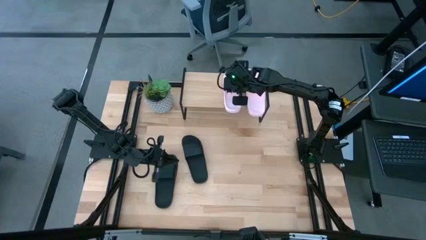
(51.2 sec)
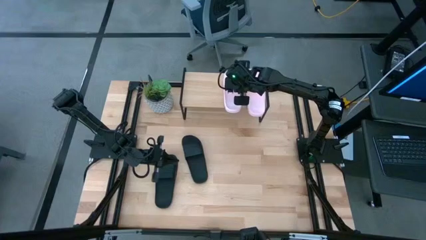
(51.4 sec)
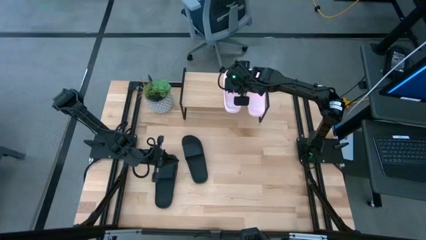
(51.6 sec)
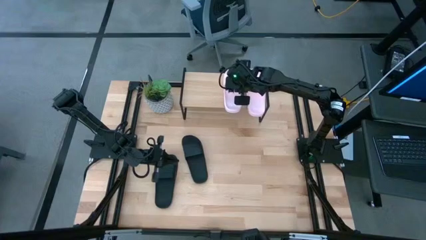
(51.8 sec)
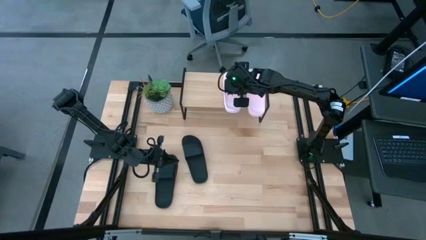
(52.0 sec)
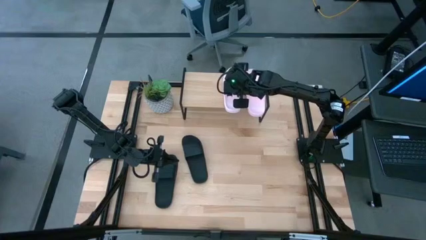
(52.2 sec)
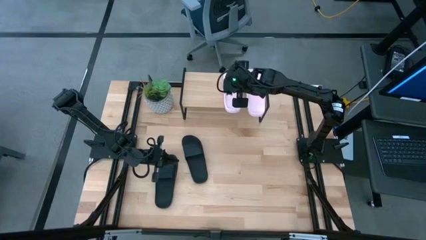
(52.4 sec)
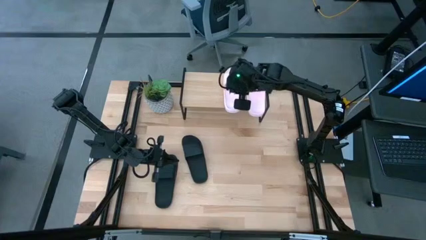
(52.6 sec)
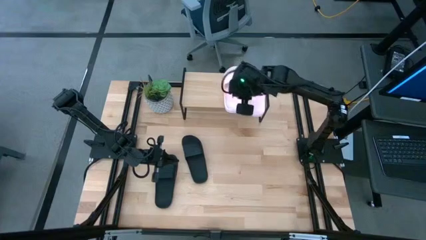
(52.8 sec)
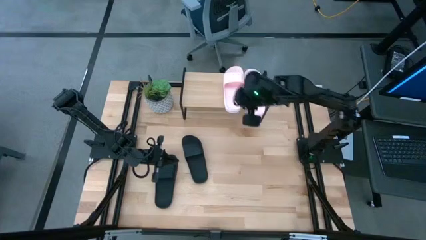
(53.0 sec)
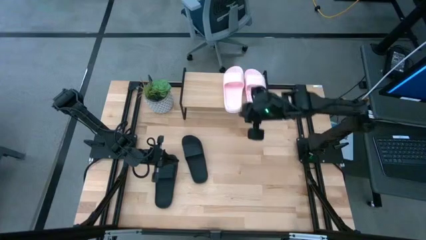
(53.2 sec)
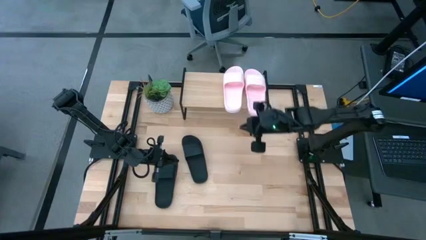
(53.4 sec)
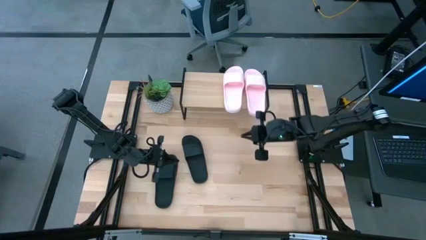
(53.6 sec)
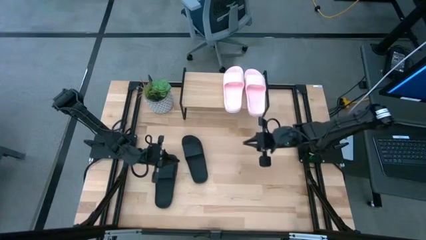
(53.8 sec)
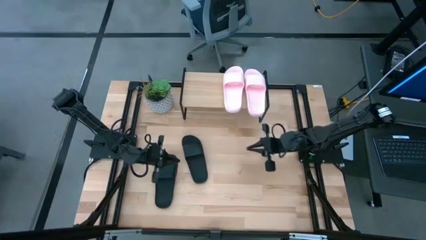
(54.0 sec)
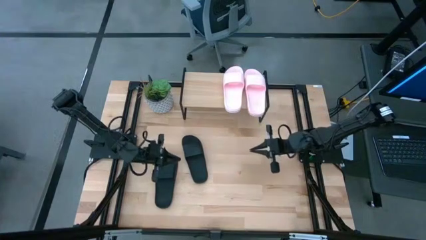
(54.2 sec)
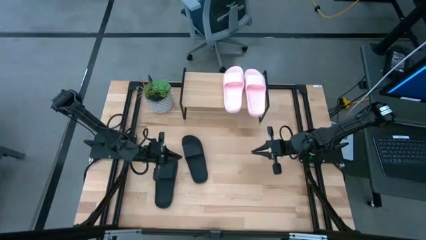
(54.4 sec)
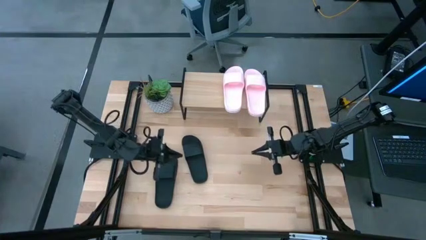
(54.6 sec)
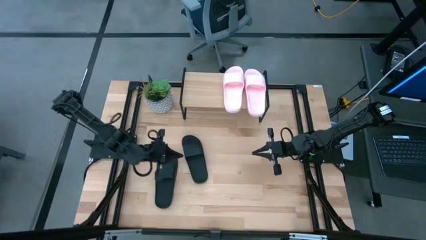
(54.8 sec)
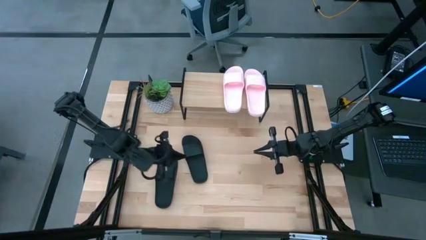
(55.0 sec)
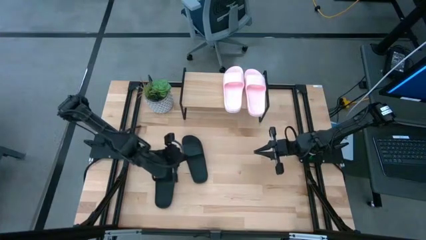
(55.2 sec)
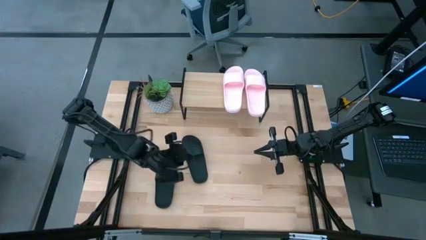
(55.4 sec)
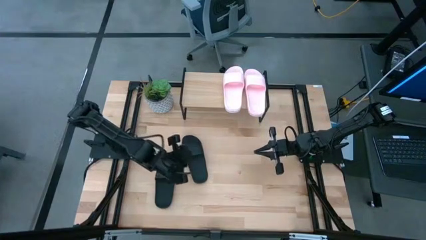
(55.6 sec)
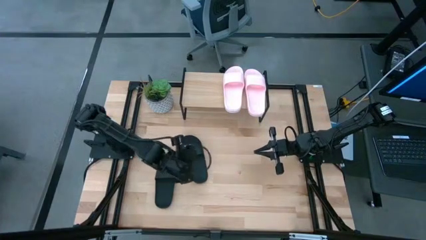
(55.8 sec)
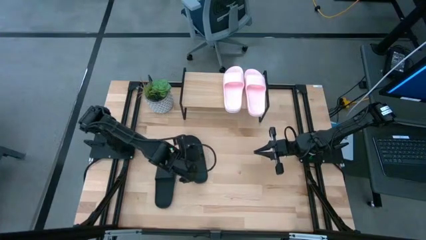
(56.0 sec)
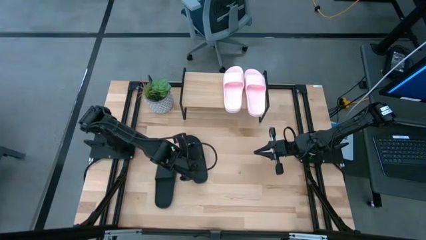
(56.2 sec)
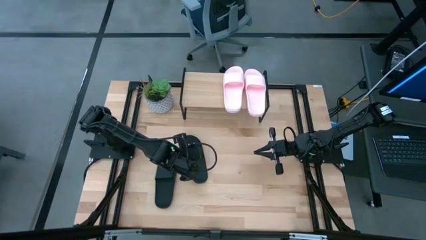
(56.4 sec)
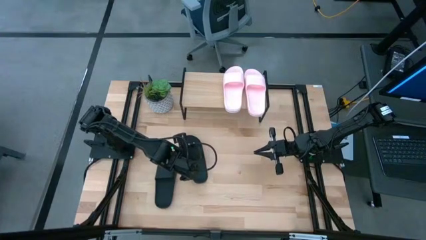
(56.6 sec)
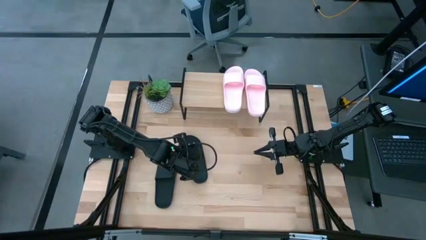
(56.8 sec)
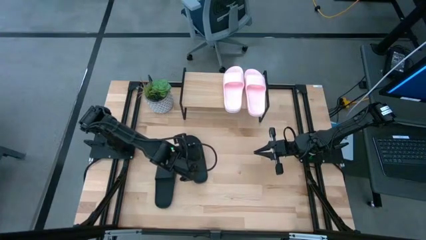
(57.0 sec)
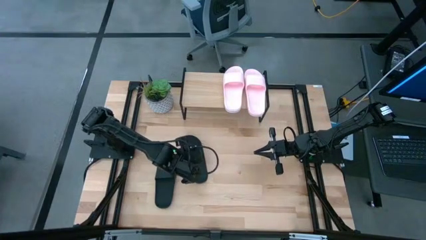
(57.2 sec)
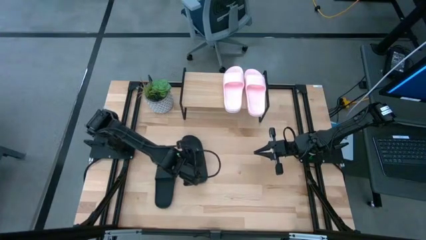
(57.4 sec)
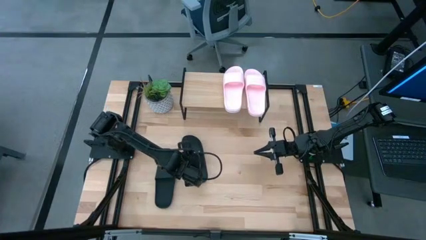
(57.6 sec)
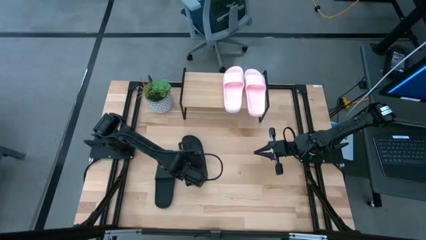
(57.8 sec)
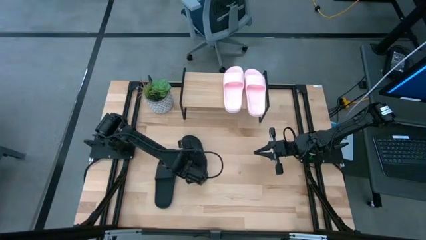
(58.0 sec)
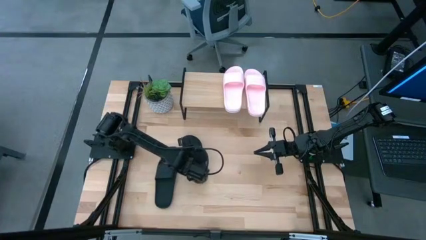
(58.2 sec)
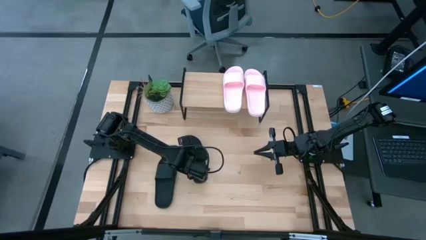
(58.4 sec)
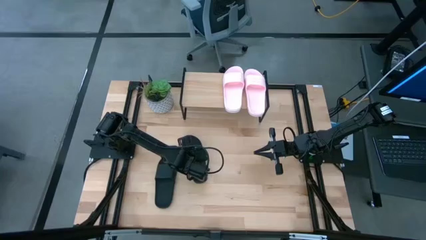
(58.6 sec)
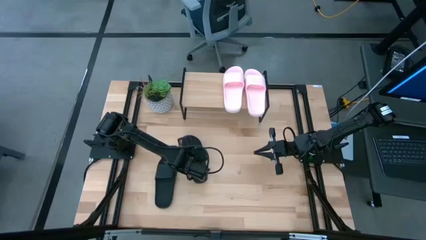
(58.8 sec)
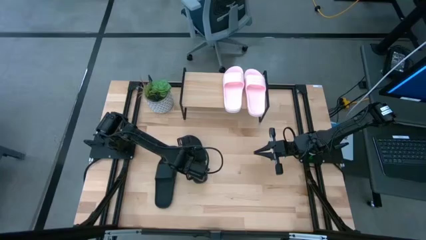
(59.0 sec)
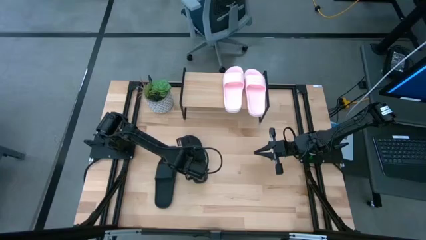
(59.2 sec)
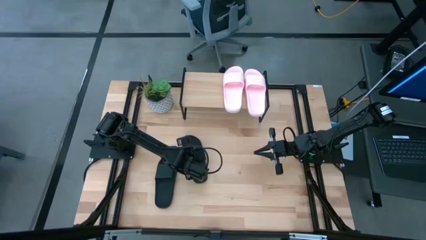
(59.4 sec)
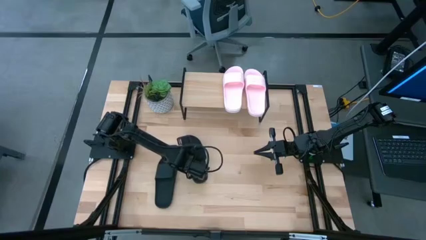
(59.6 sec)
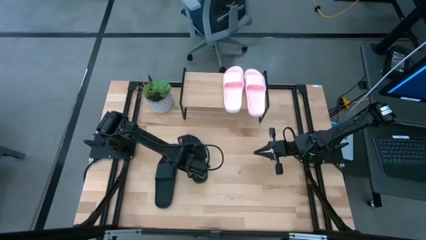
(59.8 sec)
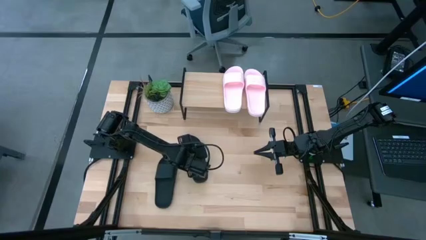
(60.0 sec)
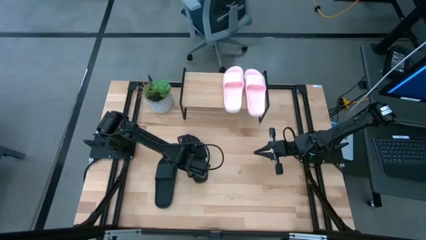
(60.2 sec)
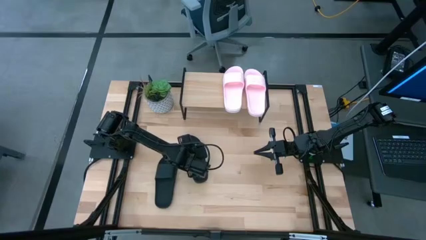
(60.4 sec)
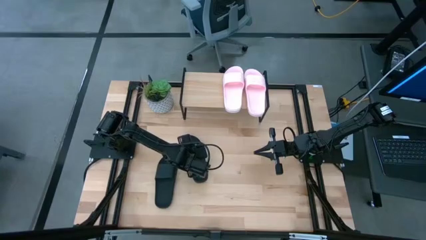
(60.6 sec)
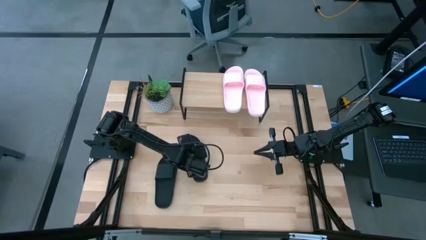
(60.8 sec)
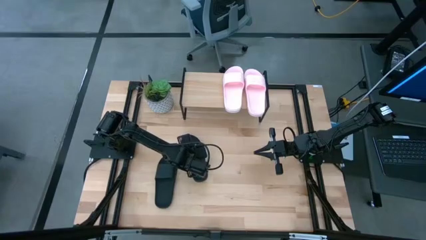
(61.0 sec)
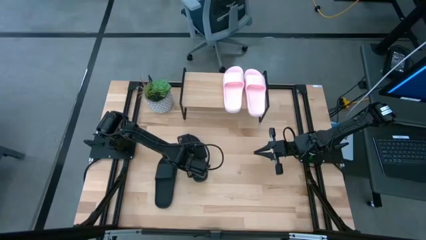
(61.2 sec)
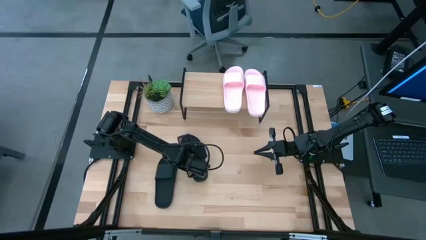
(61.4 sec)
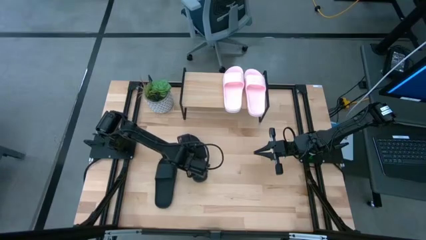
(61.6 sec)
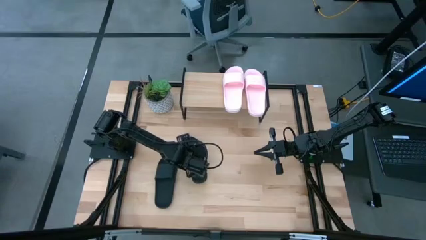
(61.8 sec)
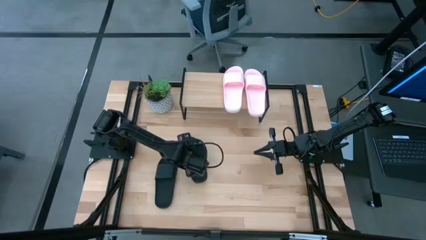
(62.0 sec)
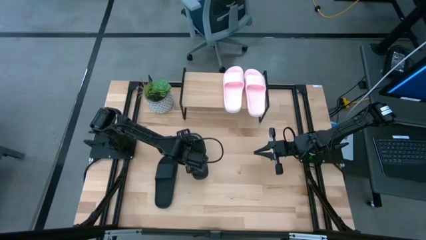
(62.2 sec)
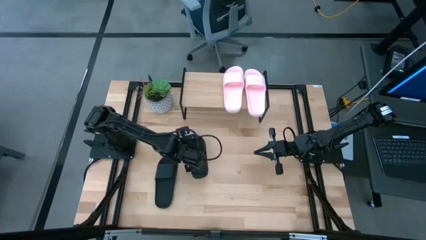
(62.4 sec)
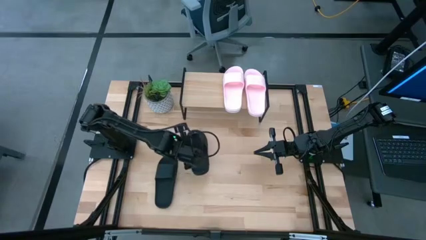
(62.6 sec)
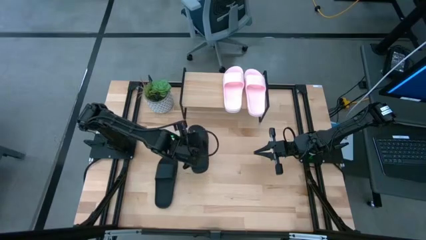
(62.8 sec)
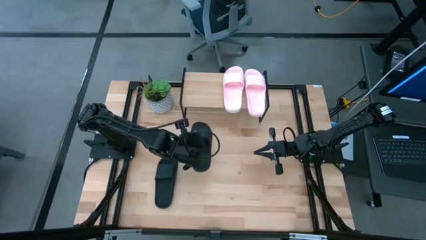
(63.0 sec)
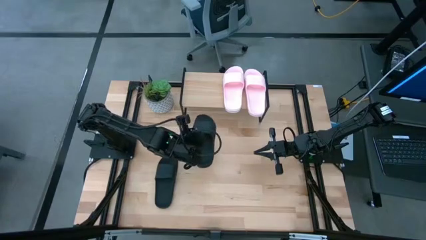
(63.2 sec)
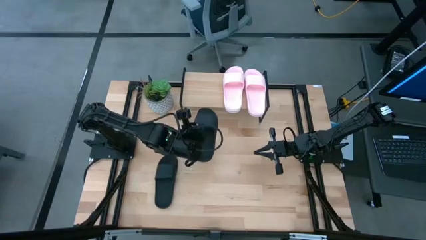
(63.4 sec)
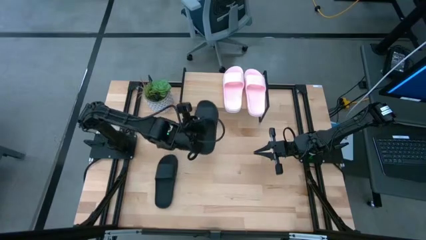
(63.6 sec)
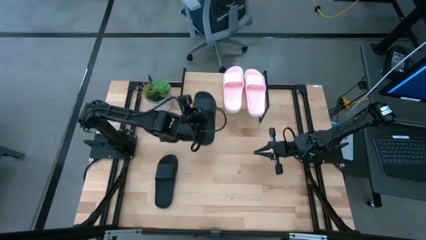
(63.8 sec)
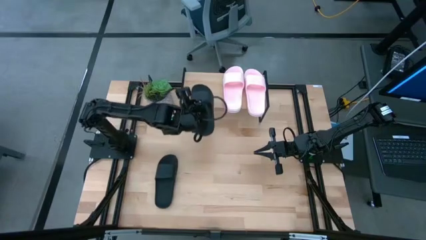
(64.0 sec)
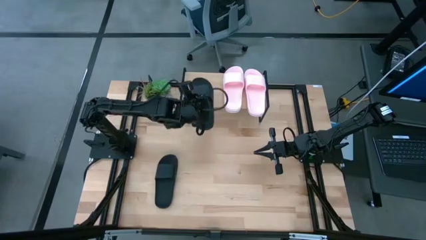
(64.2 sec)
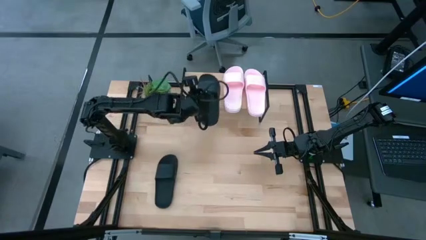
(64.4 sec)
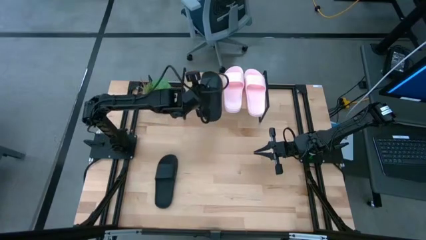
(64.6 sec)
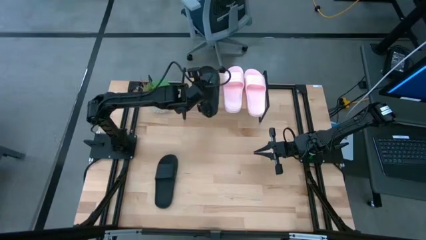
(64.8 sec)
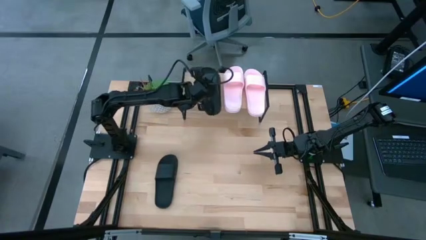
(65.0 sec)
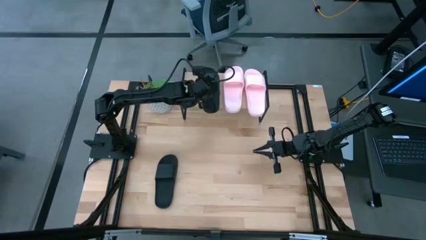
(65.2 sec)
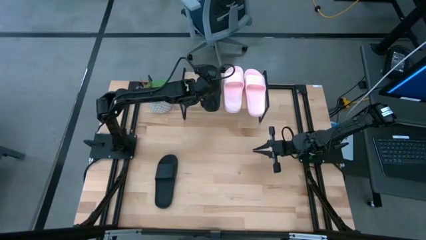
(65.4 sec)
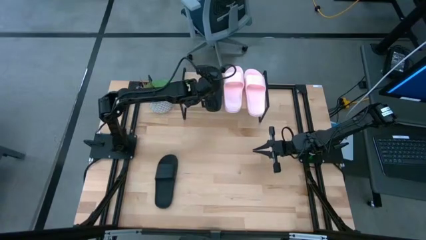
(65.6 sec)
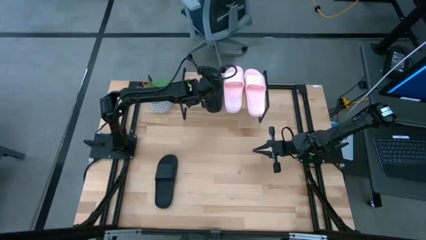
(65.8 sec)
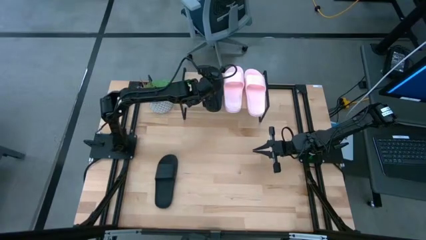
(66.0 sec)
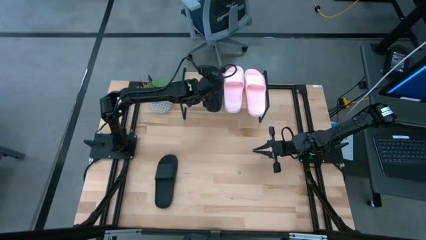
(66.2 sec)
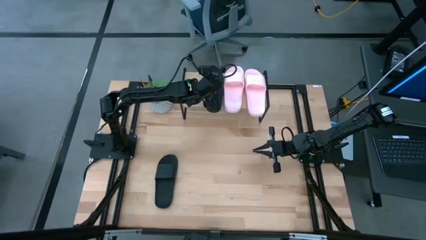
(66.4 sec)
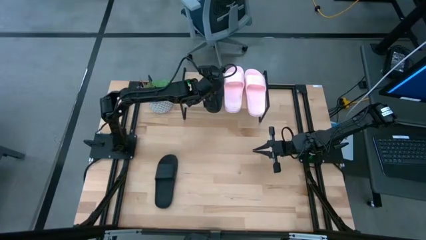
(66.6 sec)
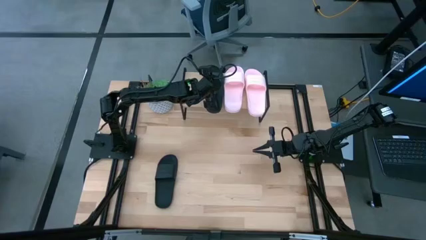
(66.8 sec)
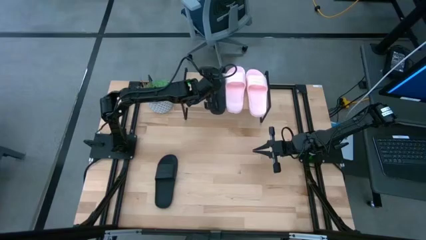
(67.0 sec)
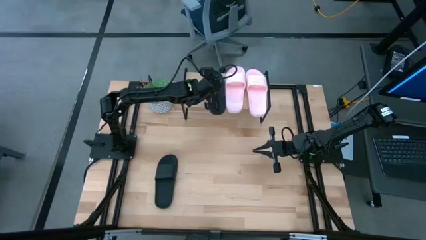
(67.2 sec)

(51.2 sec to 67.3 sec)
Task: Pick and place slides into the shelf
Put the top black slide on the shelf
